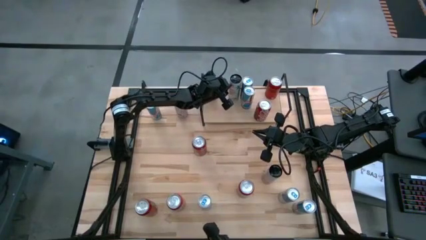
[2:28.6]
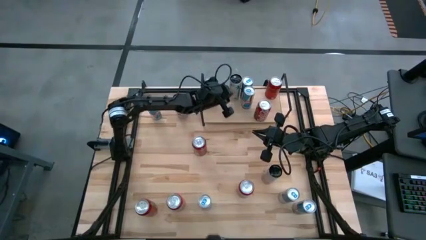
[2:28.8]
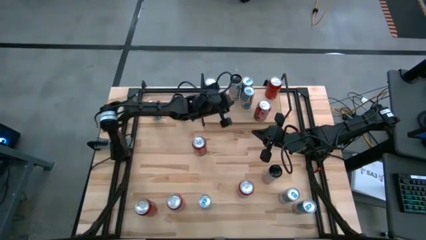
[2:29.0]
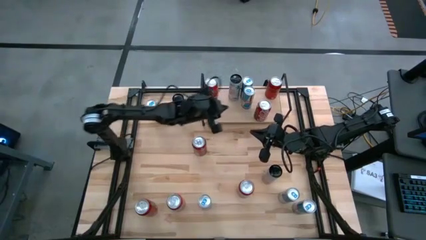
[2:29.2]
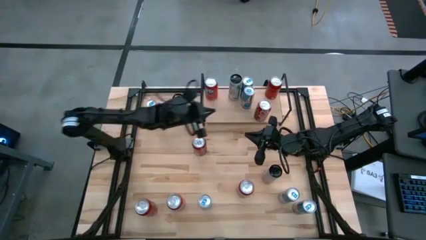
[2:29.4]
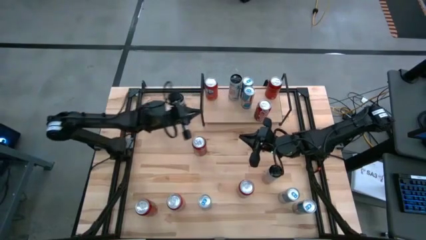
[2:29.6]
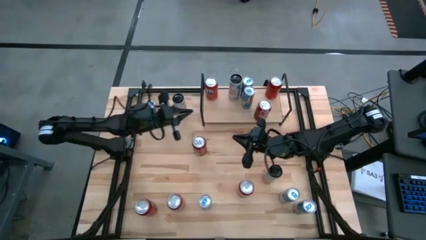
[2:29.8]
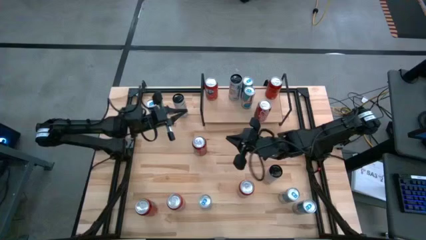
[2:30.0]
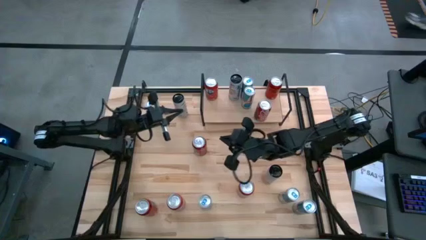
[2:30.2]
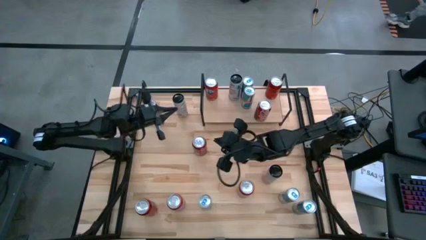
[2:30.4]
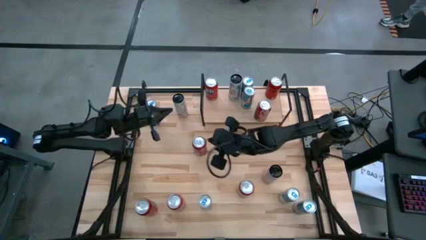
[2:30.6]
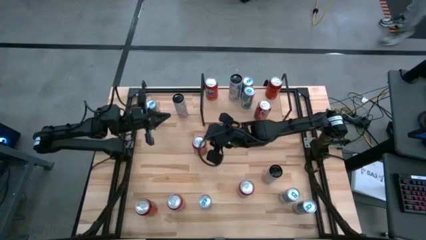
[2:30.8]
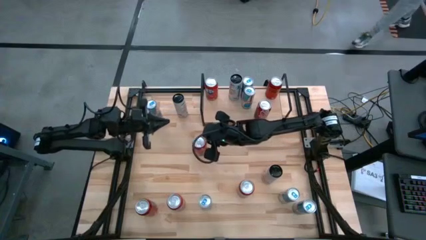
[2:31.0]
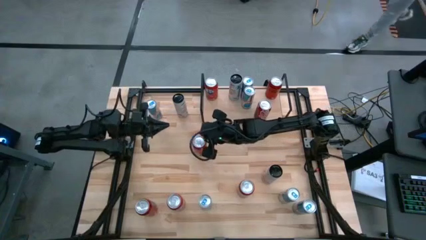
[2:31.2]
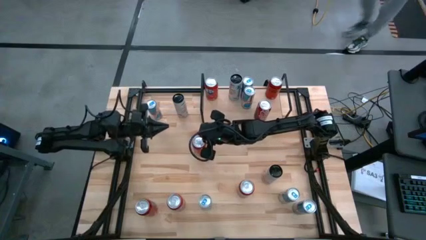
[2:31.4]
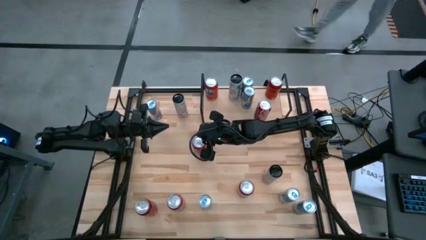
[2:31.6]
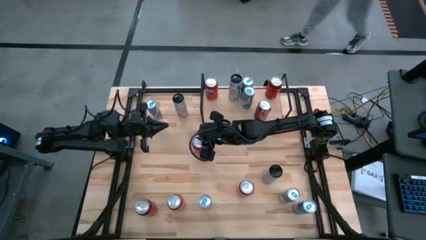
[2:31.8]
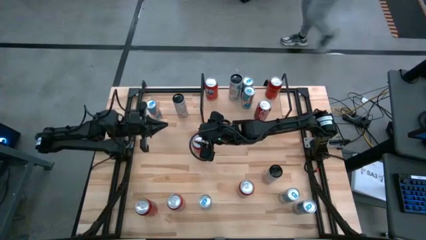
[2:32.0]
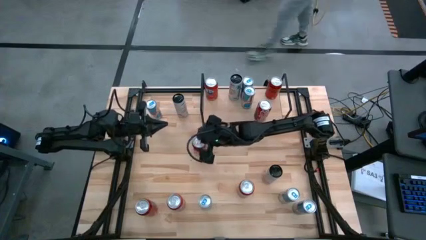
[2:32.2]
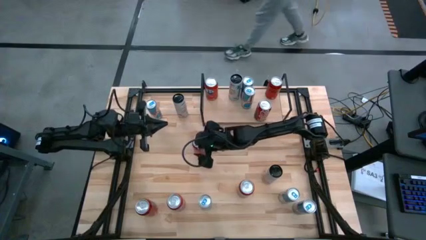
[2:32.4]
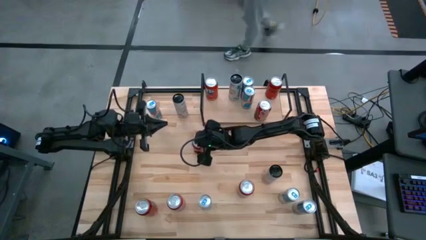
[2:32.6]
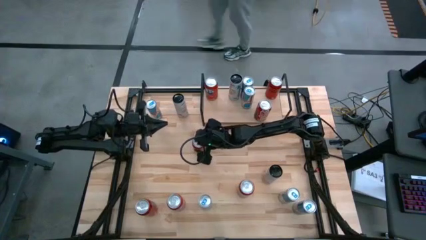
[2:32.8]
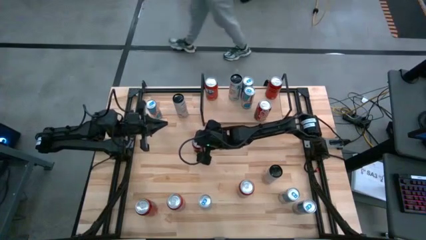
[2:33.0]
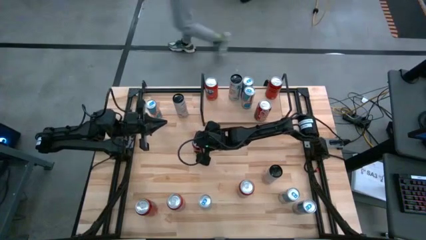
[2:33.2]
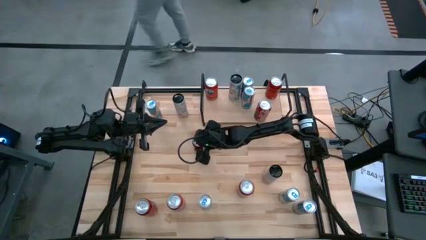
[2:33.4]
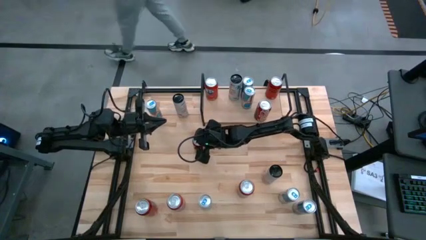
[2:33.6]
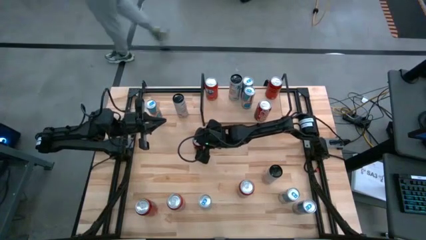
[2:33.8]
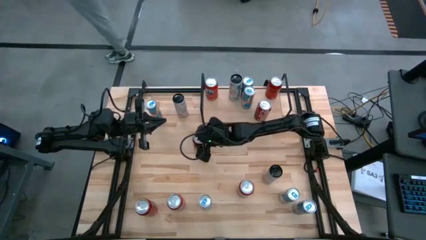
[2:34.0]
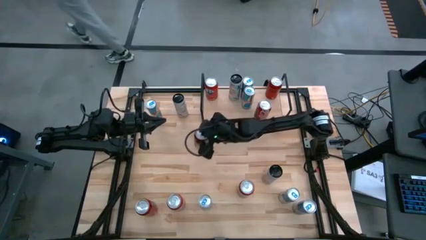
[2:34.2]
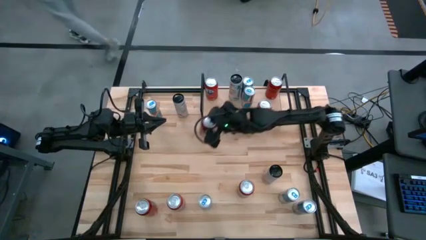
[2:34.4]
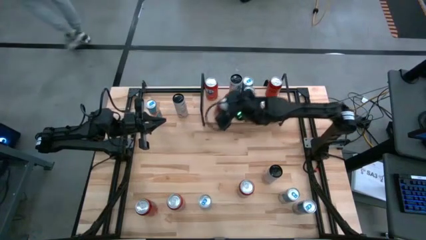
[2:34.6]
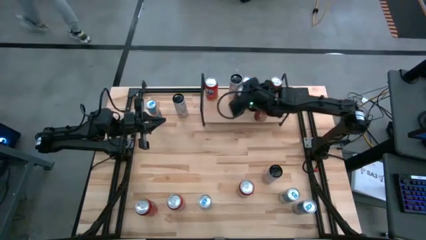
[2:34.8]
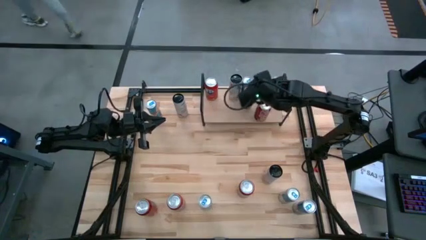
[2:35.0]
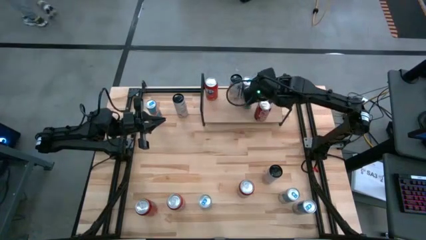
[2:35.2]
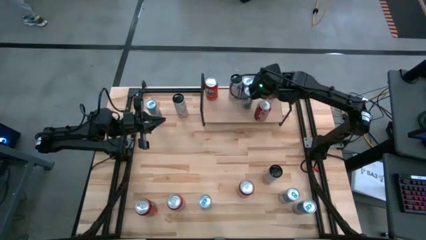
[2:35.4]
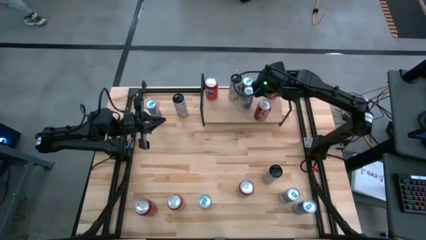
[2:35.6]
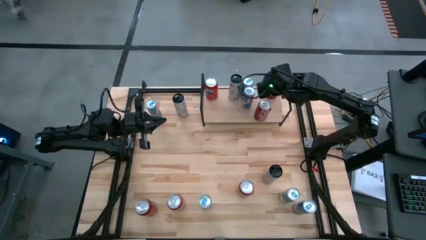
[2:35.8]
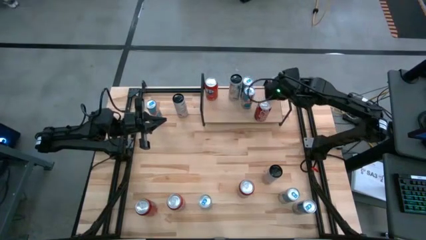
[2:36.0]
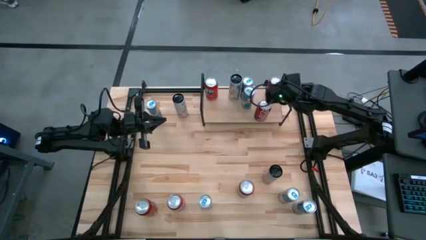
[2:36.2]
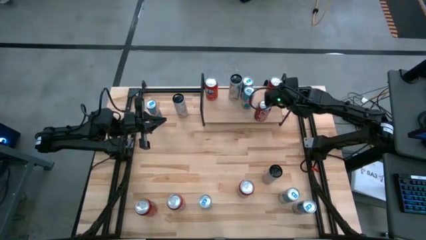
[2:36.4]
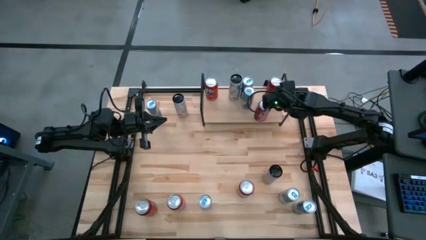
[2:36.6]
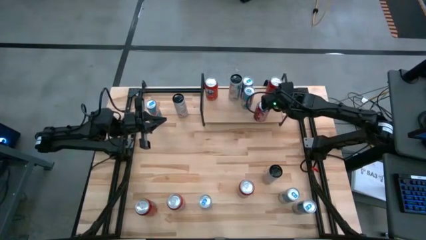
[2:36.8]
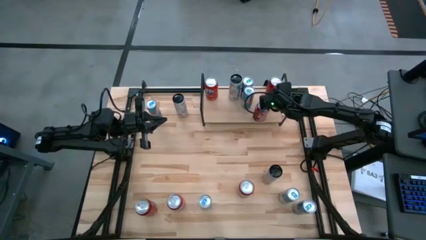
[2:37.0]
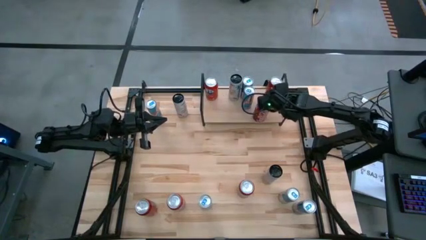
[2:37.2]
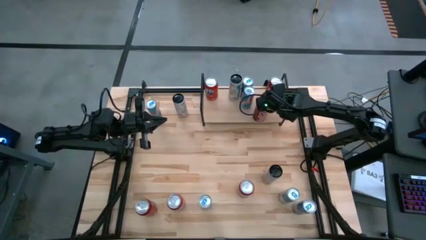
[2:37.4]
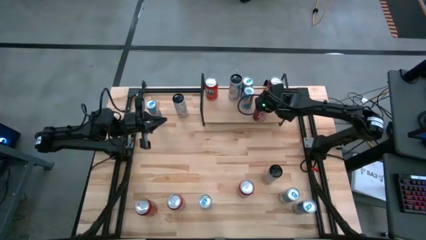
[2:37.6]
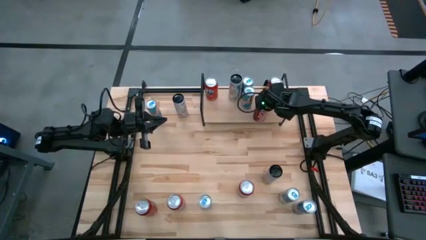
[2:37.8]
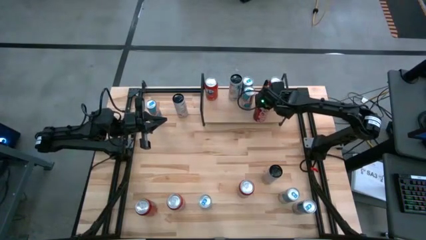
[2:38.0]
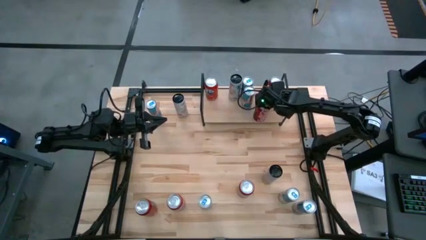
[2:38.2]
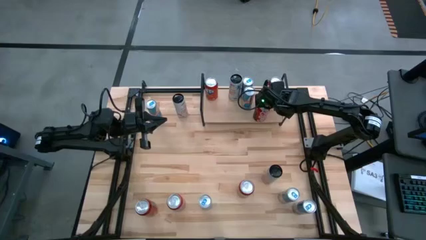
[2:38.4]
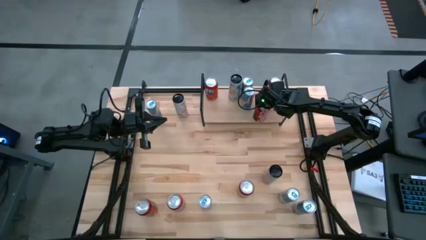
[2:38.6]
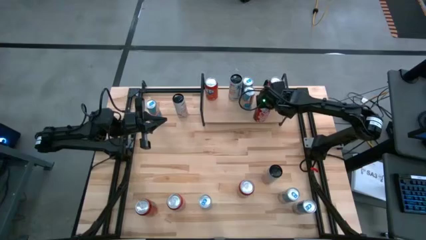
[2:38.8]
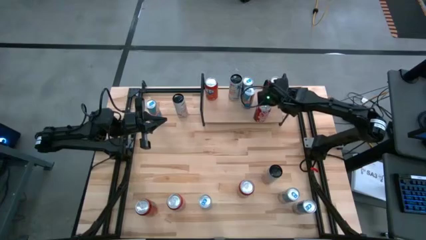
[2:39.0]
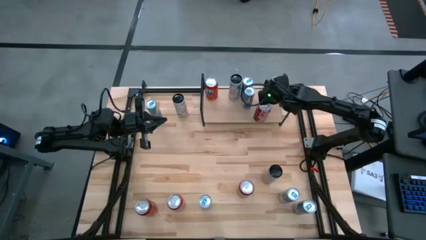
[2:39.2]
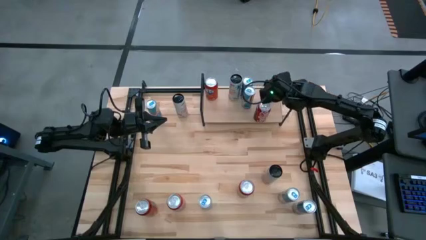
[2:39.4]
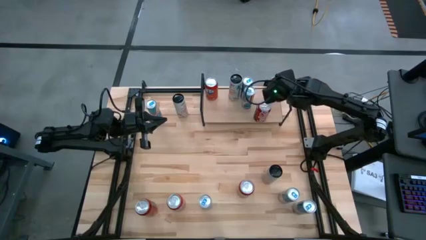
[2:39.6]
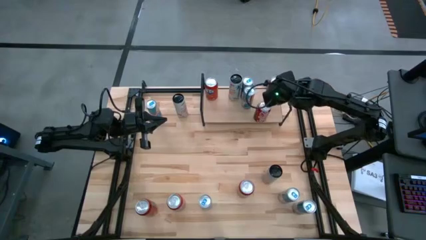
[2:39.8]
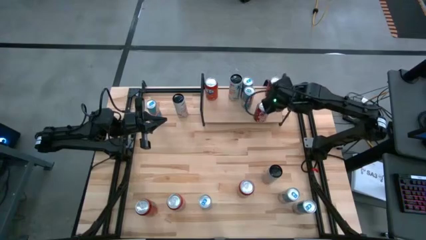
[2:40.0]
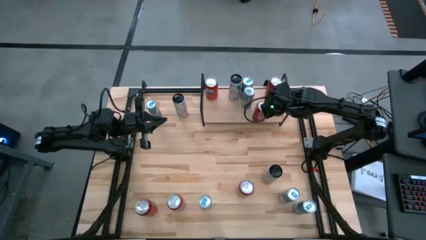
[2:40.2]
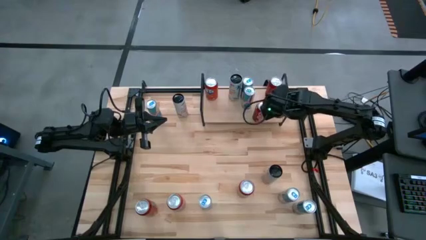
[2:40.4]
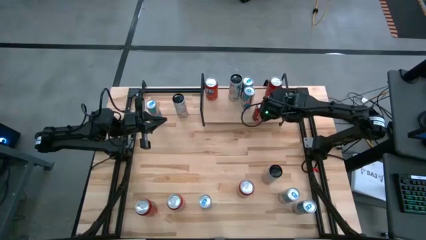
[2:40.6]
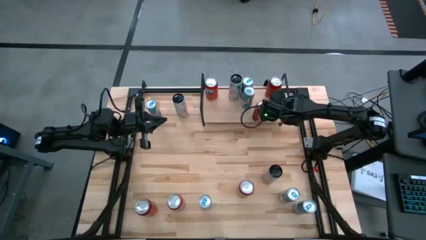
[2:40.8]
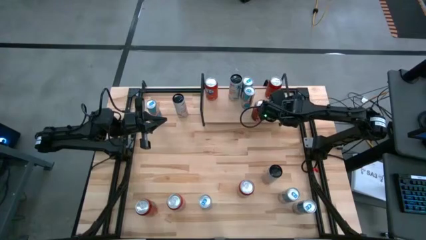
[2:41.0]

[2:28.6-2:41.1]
Task: Place canned beverage on shelf
Put the dark red soda can on the shelf

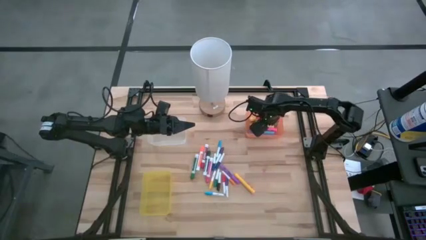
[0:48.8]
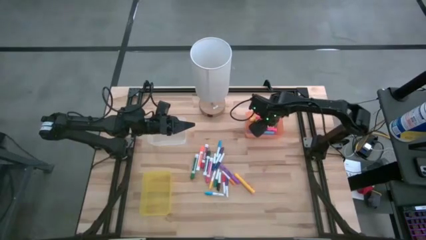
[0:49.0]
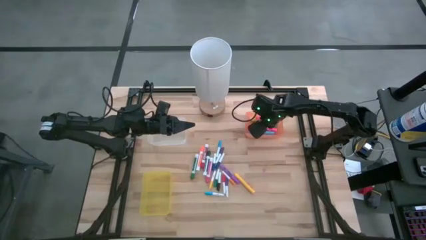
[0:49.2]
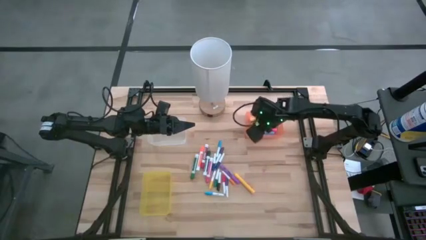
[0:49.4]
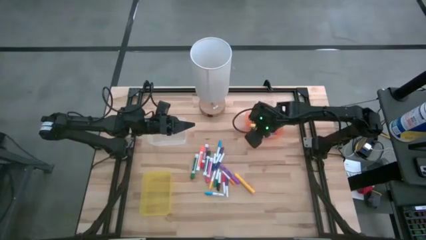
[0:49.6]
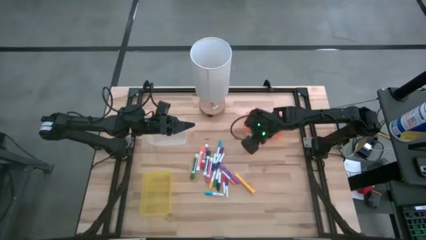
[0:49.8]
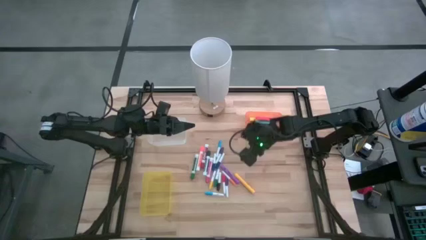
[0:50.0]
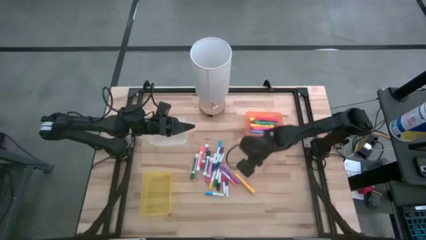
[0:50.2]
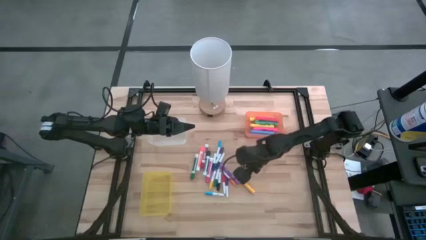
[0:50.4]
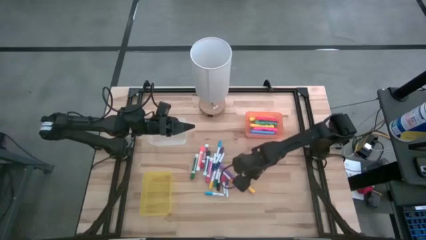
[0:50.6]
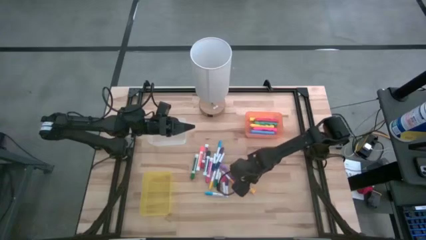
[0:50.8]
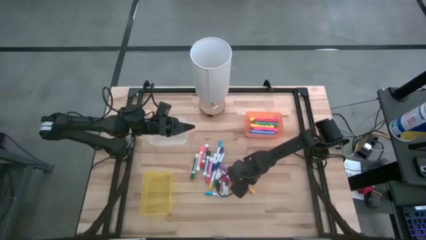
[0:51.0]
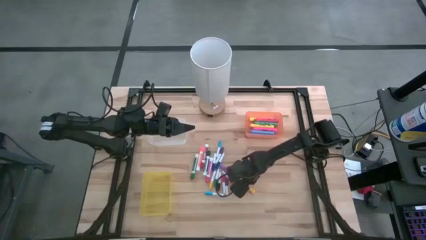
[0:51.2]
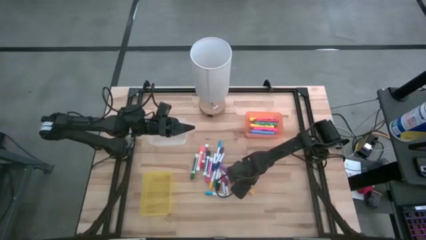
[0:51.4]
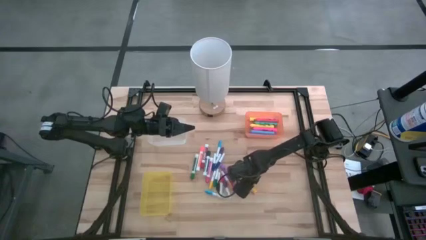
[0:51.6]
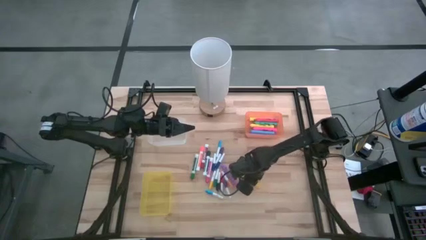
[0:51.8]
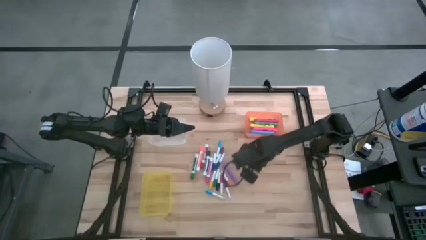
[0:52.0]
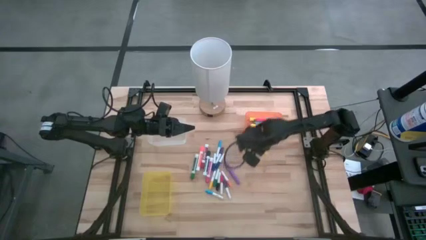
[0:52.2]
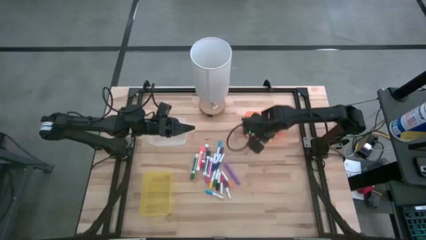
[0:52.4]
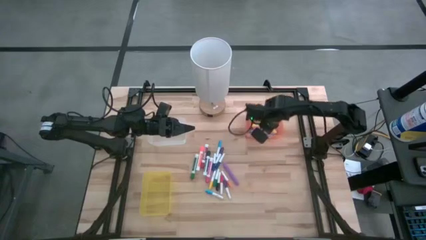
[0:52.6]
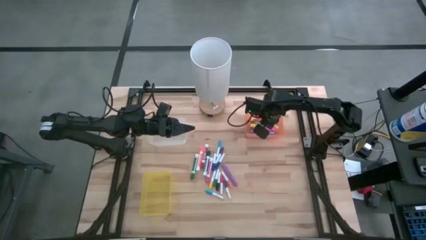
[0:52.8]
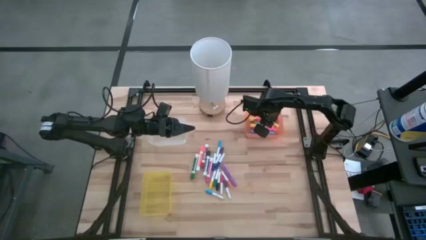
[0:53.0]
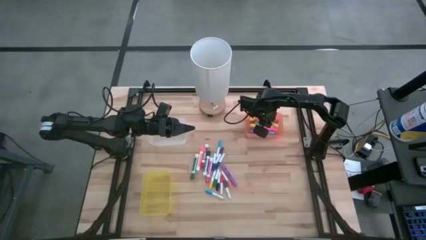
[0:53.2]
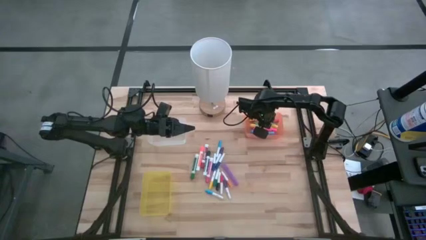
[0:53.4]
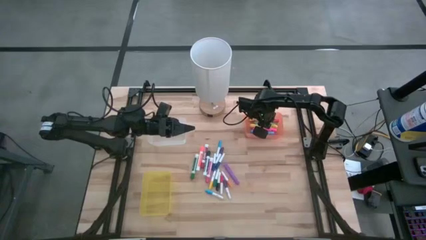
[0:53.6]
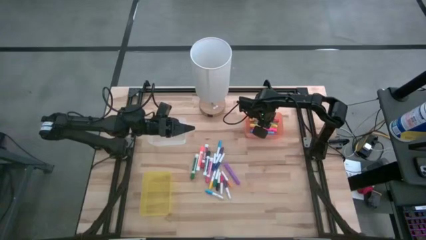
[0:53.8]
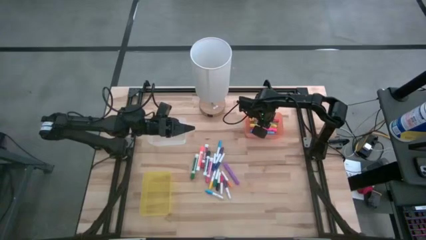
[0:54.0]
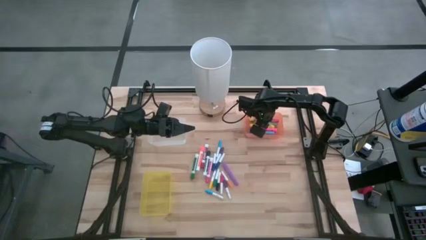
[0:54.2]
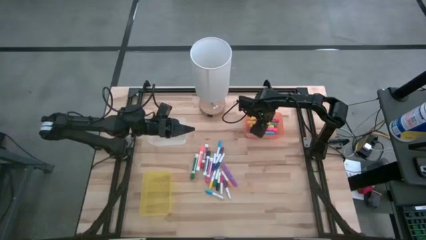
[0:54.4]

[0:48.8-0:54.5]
Task: Pick & Place Markers
Put the yellow highlighter pen into the orange bin
